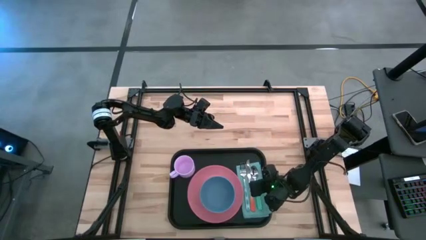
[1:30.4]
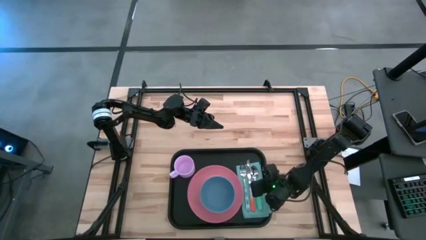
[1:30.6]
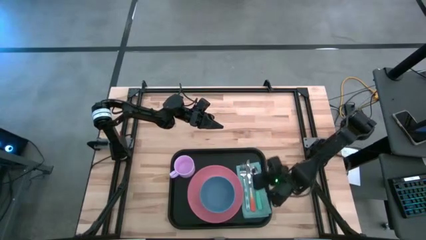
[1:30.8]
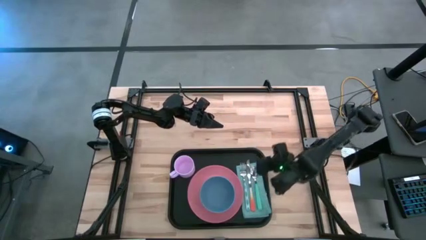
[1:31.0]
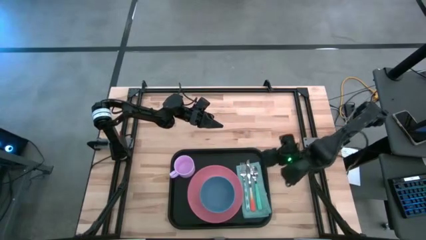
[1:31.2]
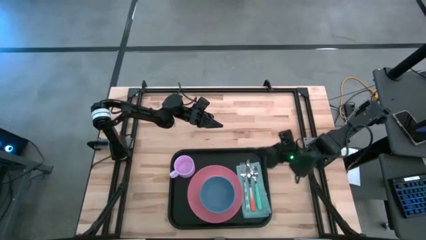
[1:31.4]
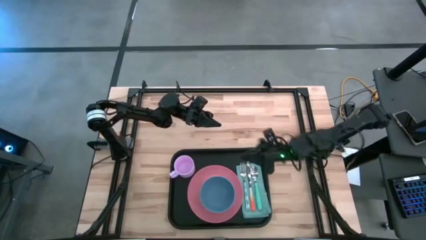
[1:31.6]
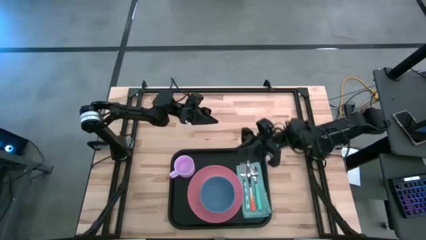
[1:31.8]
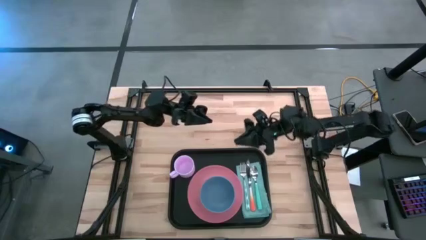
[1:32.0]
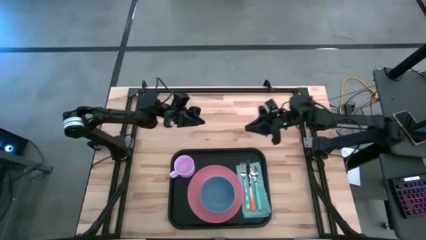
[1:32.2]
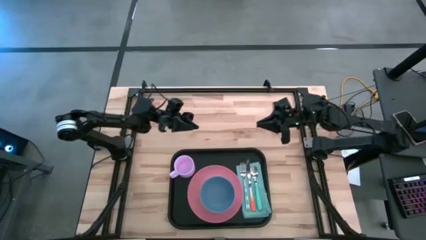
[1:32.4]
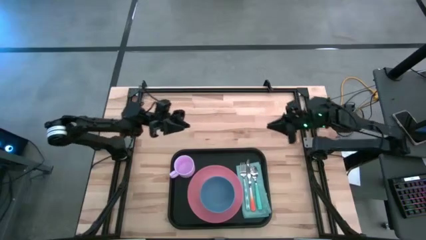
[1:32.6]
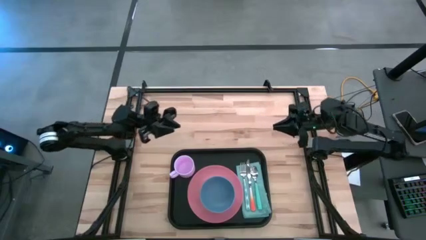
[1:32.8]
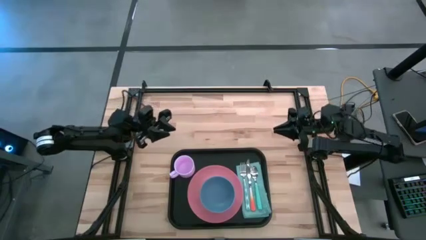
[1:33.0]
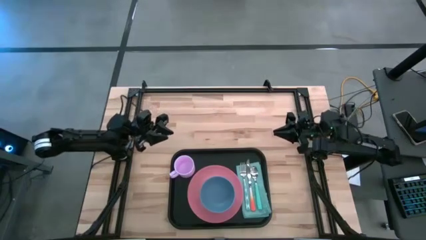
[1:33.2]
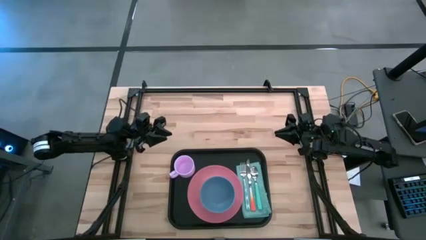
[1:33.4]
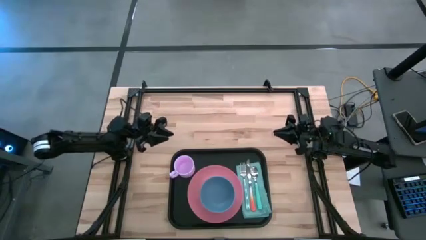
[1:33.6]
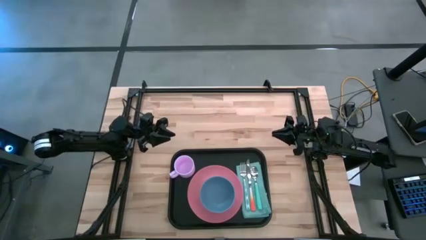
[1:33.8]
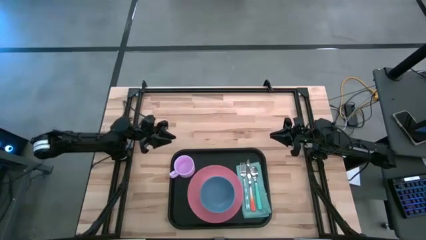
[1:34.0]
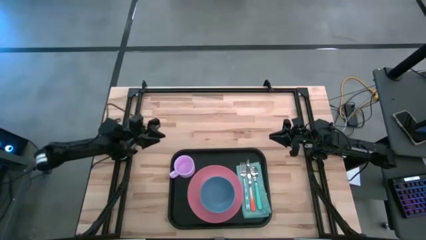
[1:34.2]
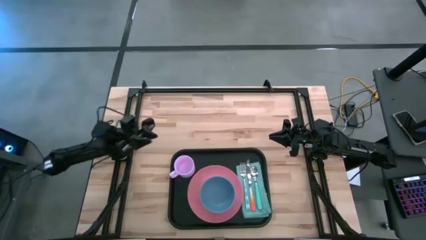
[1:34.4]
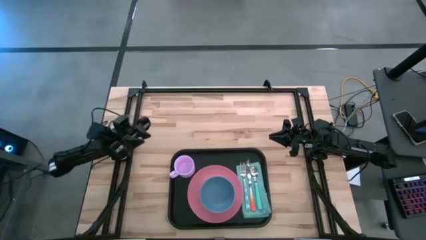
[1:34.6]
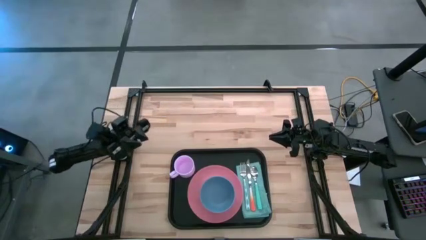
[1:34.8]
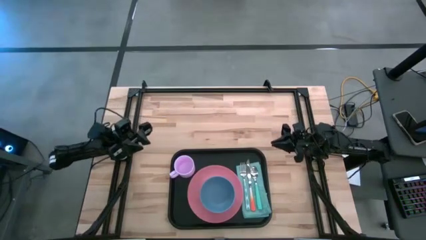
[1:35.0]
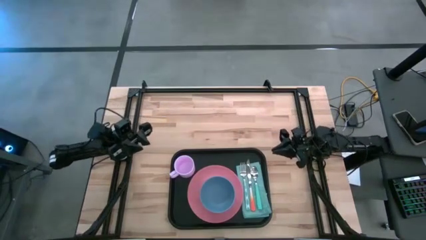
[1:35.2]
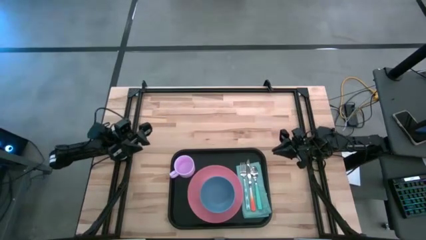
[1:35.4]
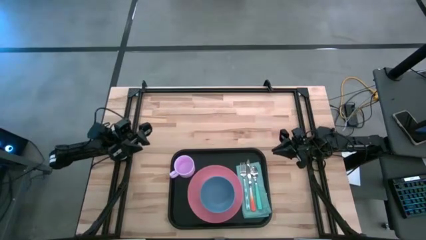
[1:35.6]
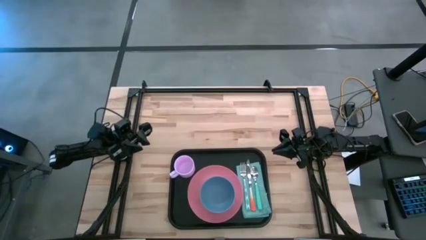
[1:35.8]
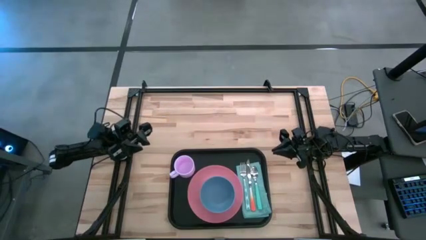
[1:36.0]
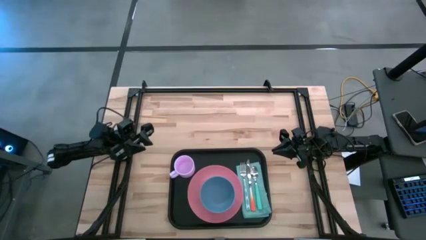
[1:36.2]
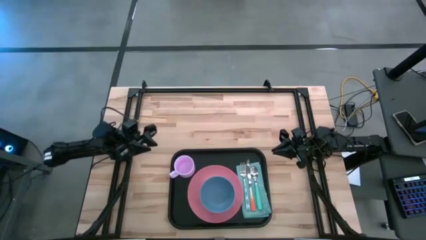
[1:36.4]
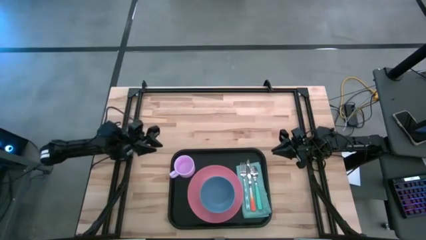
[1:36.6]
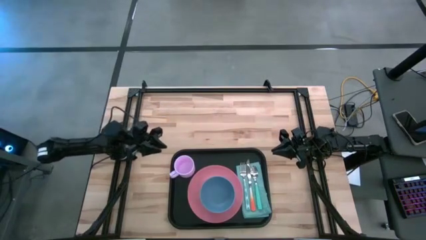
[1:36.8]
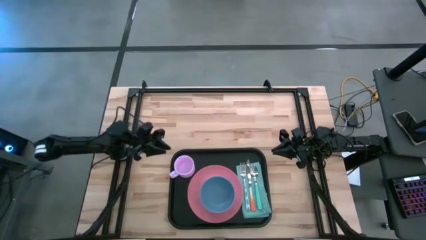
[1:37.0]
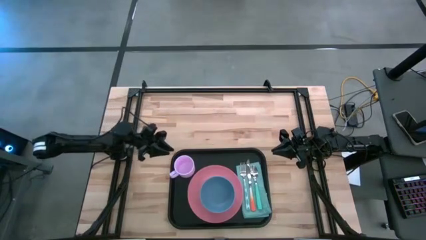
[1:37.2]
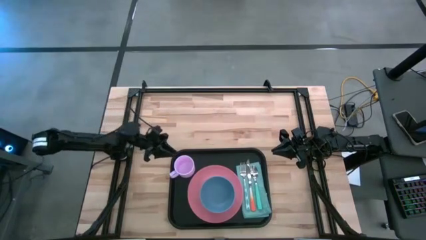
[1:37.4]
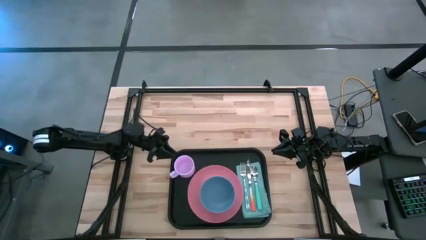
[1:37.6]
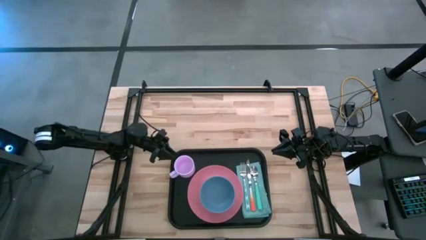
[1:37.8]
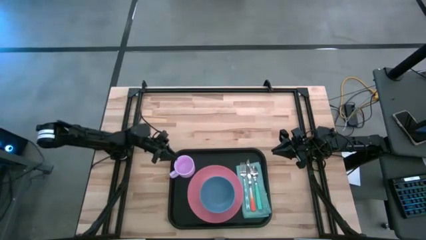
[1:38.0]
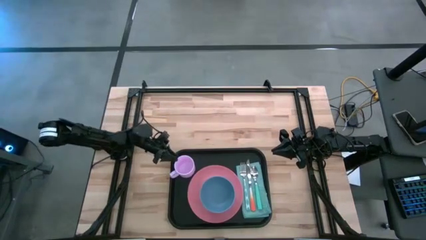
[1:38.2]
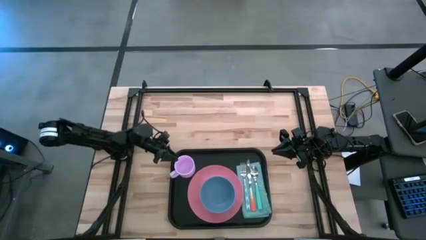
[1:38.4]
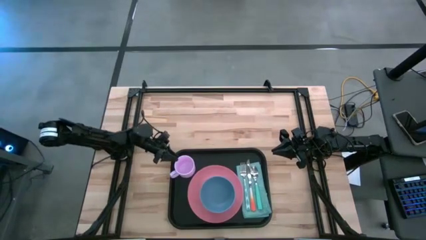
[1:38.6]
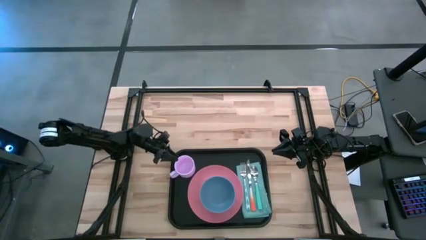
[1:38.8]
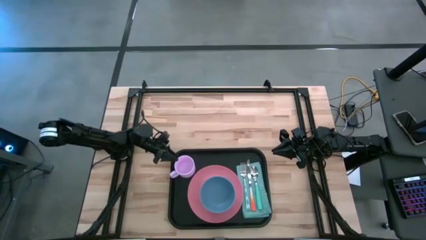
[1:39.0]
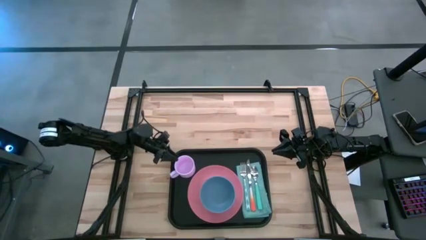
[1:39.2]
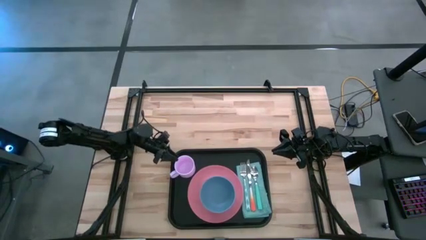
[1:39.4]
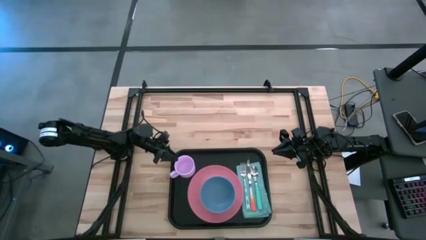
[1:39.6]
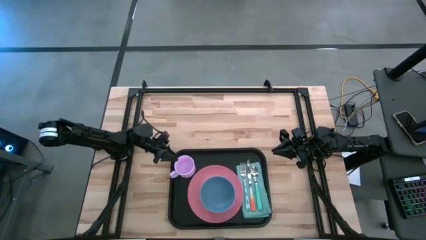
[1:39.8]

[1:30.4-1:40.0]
Task: Set up tray
Return to home position
